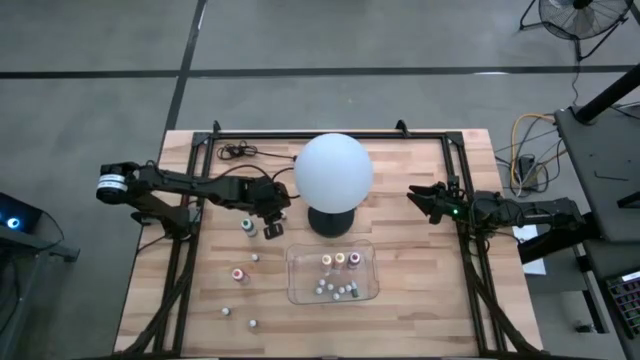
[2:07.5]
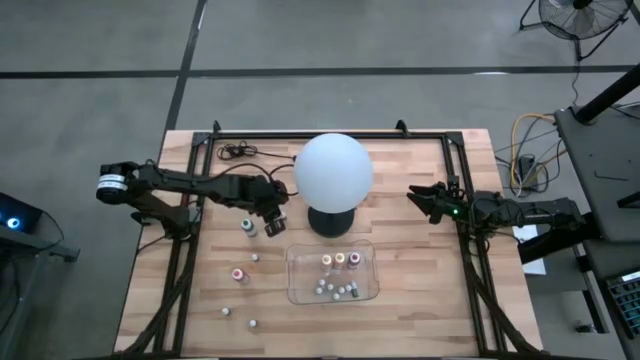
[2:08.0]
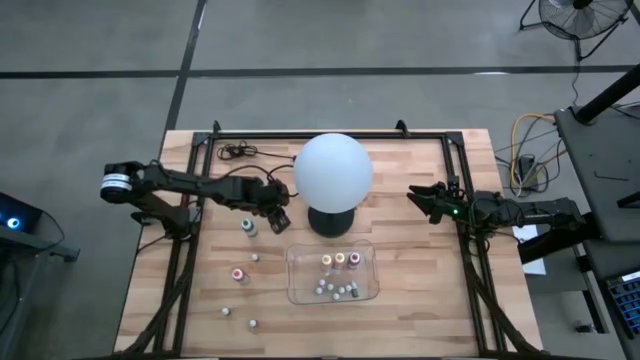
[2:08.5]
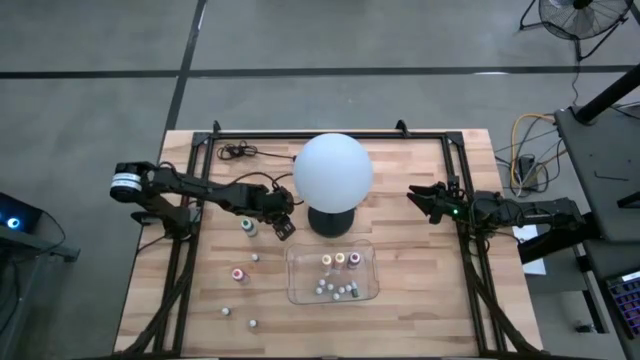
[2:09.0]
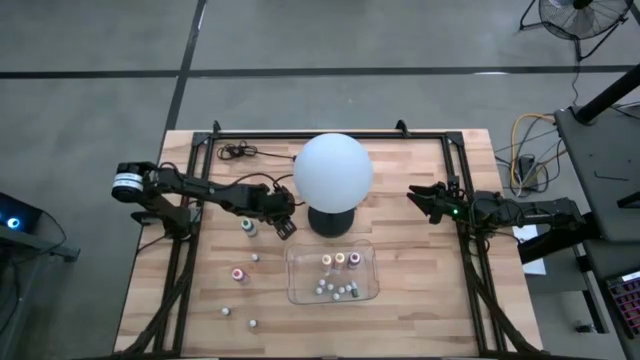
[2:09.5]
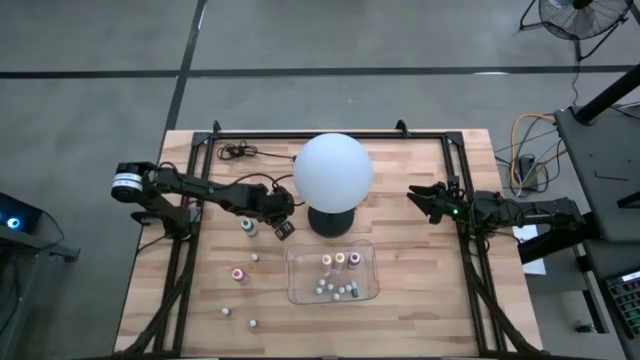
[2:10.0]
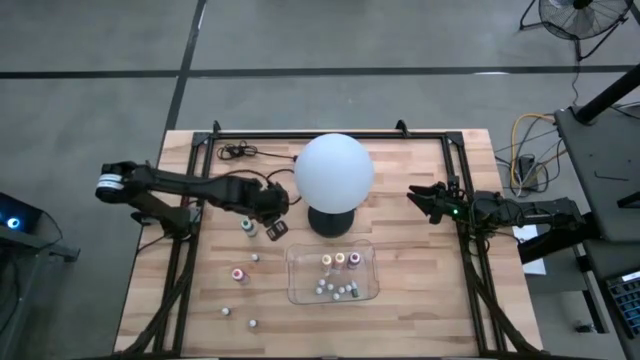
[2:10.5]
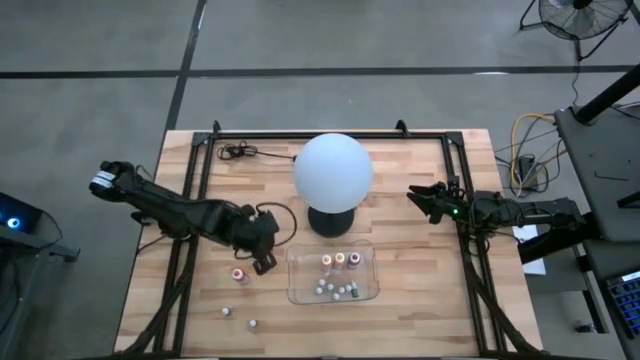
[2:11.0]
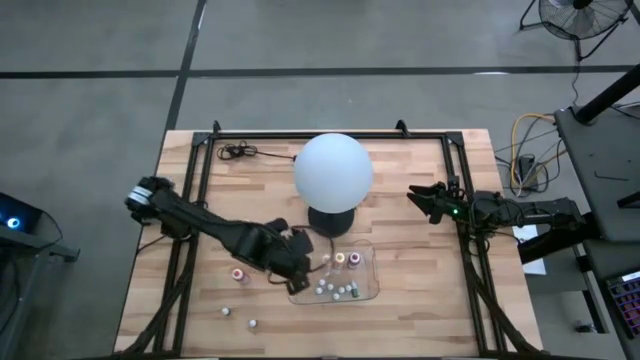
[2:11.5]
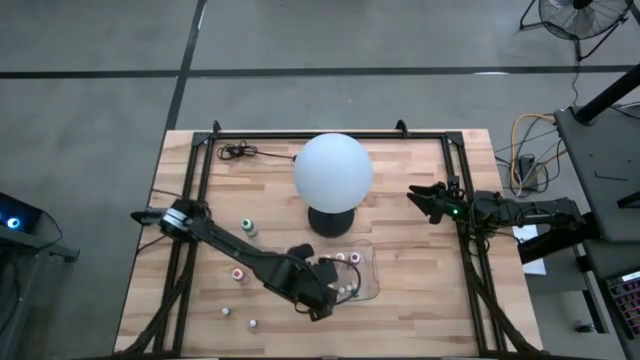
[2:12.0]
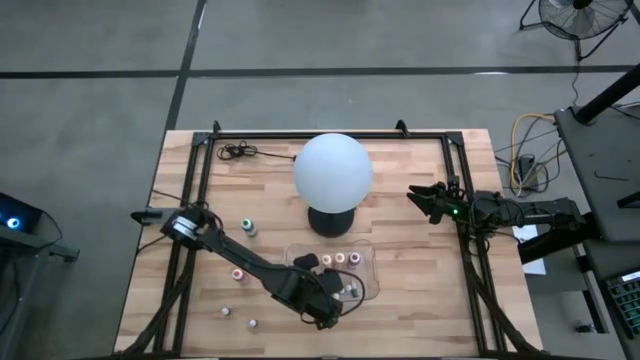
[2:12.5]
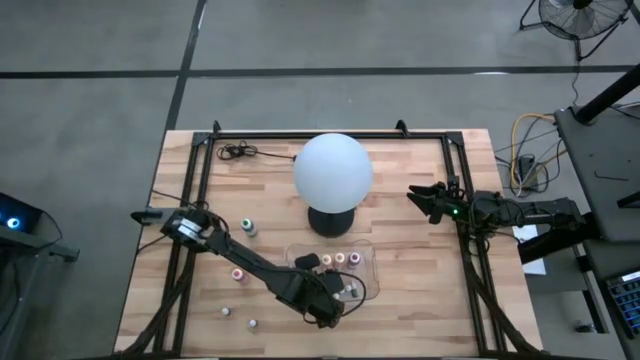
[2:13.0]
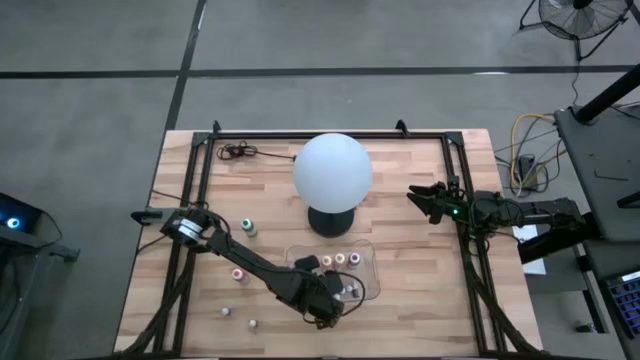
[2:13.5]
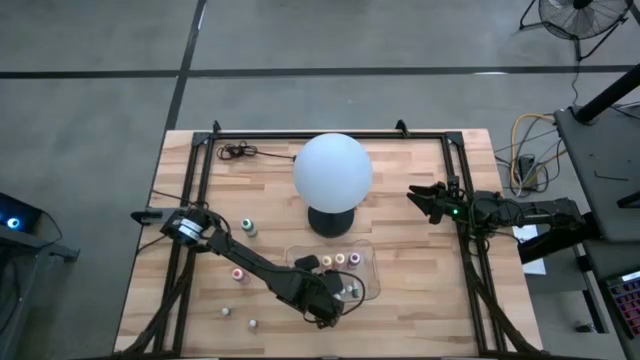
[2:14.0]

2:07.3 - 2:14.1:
Task: Pick & Place food coloring
Put the small pink food coloring bottle into the transparent bin

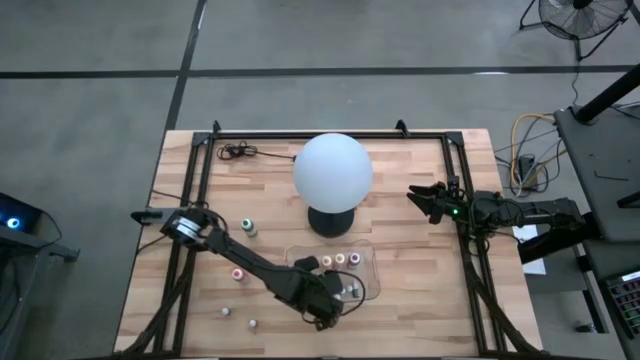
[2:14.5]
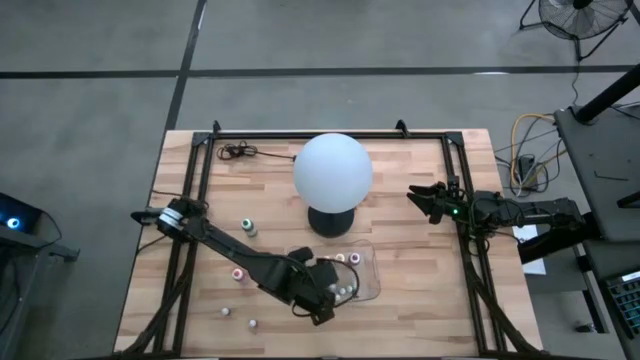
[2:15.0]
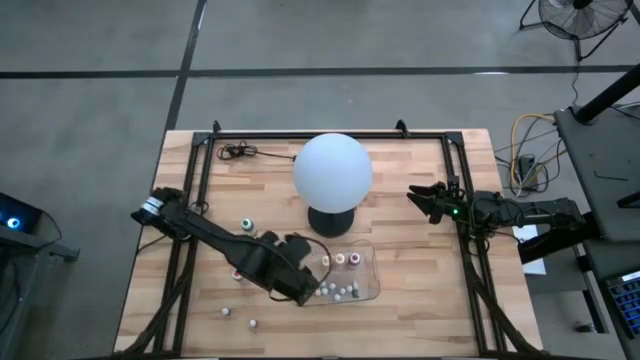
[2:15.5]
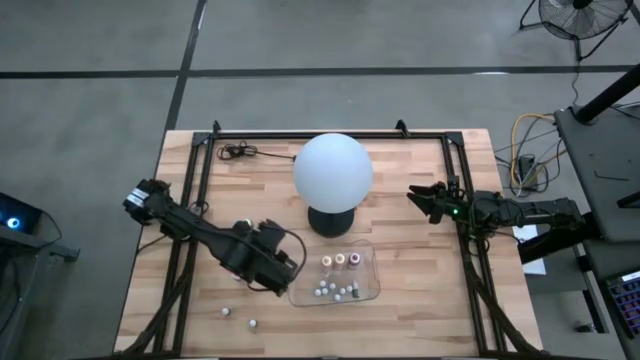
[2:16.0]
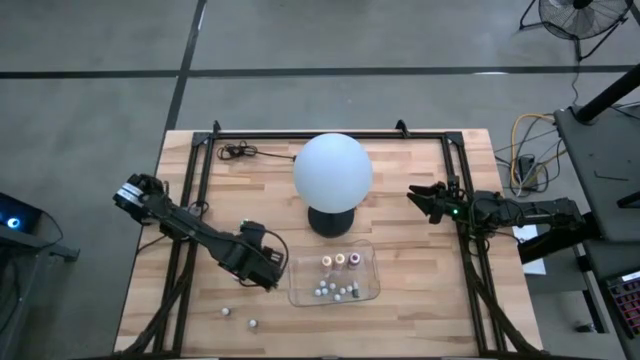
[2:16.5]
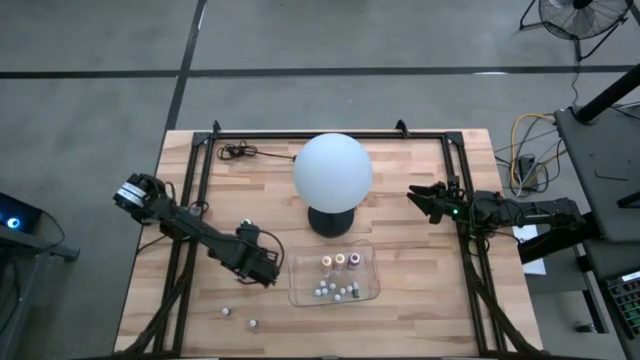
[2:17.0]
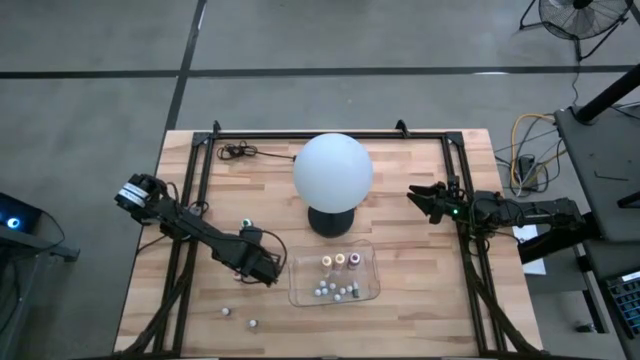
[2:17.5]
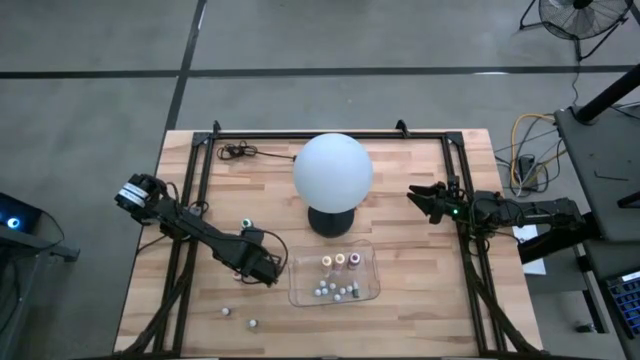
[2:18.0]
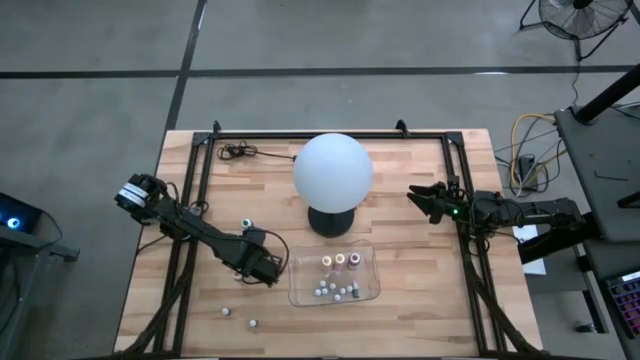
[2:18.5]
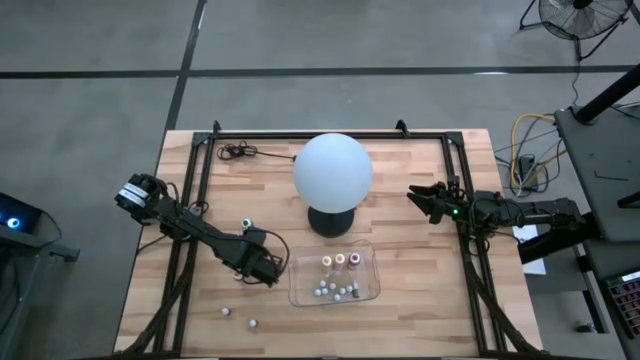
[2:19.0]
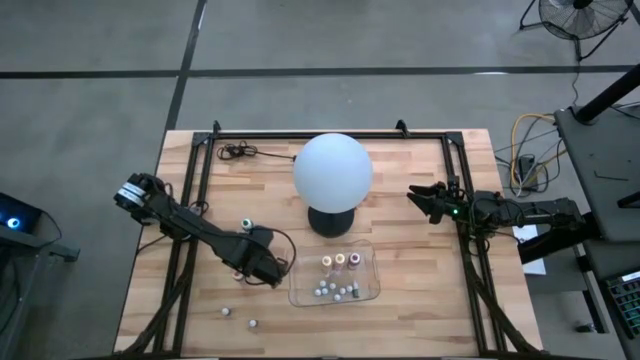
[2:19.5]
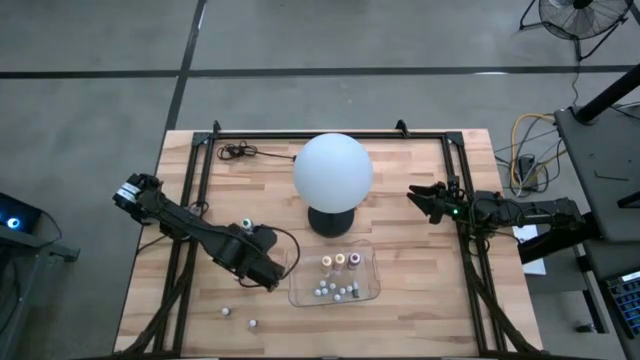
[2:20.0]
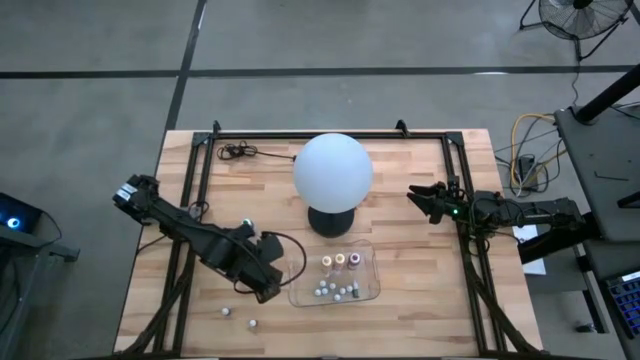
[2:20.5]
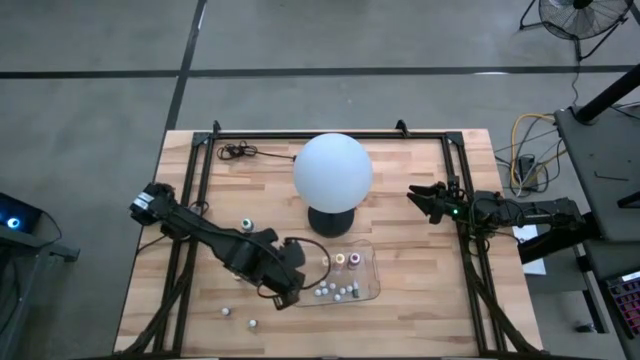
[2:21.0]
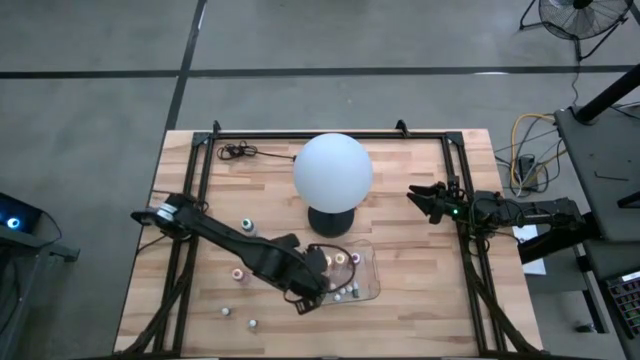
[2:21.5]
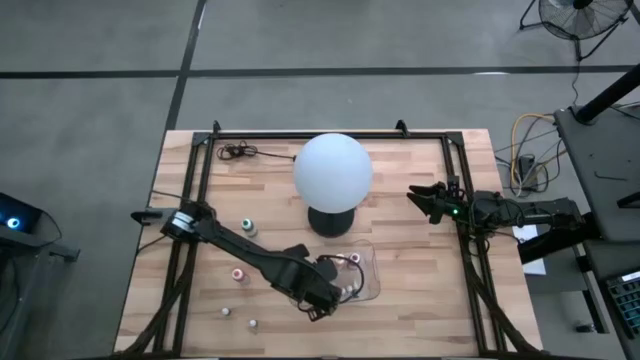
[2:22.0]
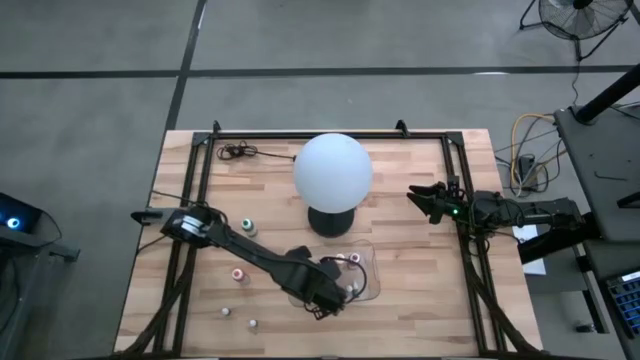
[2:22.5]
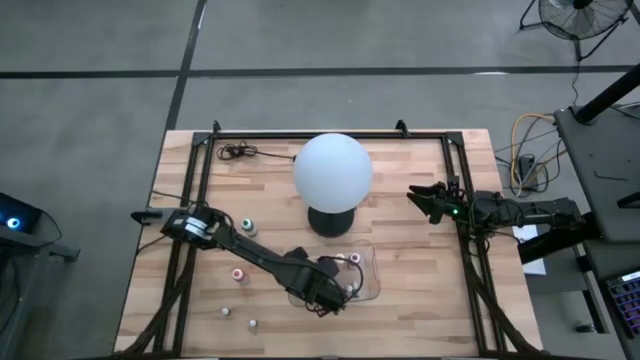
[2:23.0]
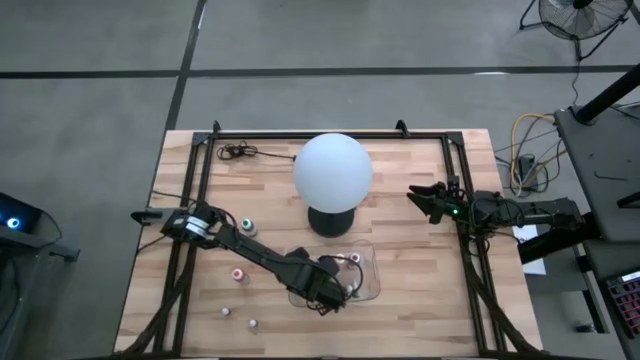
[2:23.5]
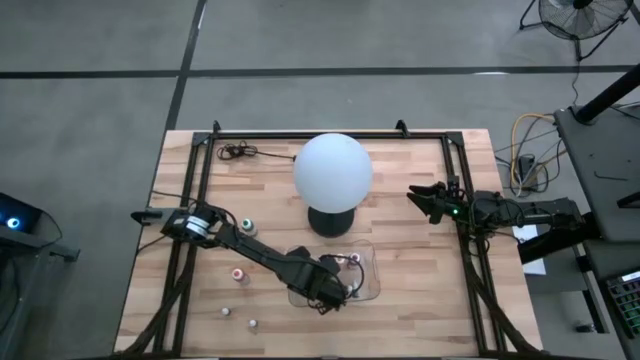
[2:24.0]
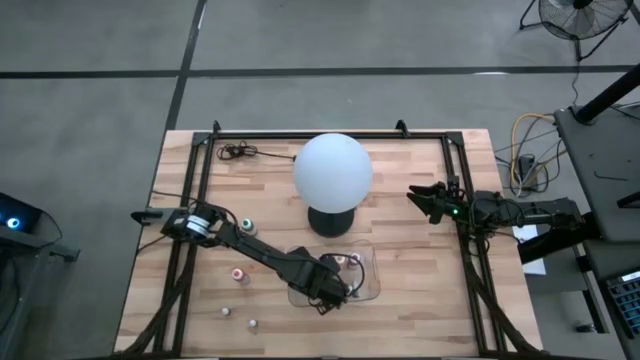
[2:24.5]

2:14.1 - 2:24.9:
Put the top right small blue food coloring bottle into the transparent bin

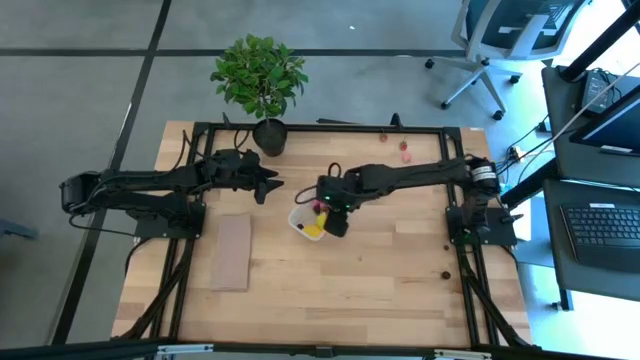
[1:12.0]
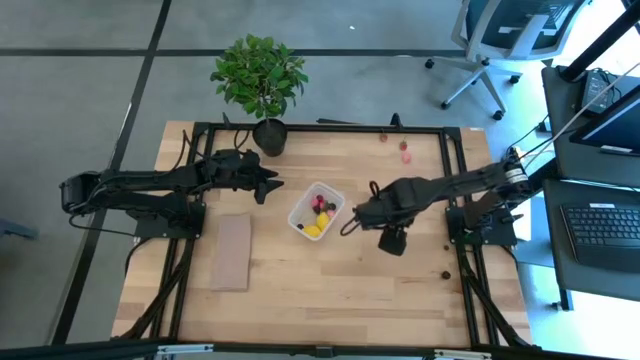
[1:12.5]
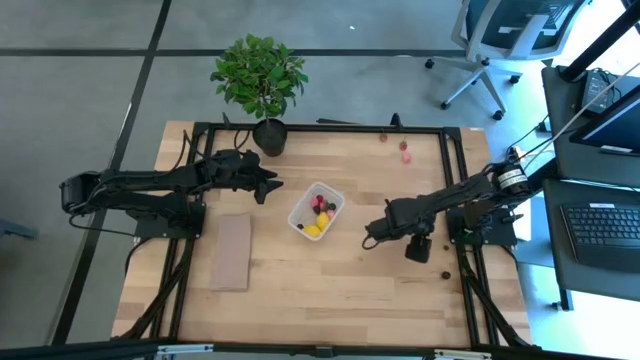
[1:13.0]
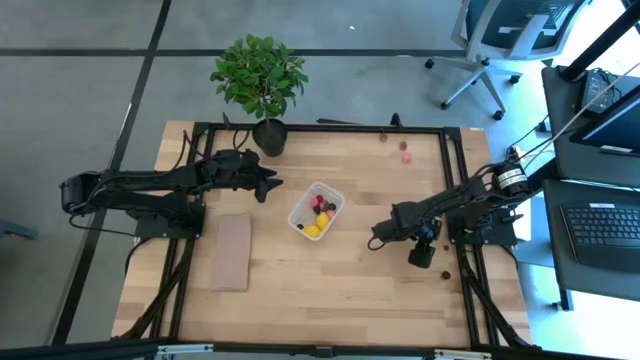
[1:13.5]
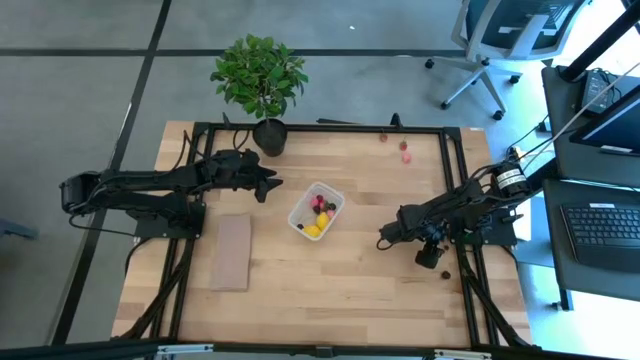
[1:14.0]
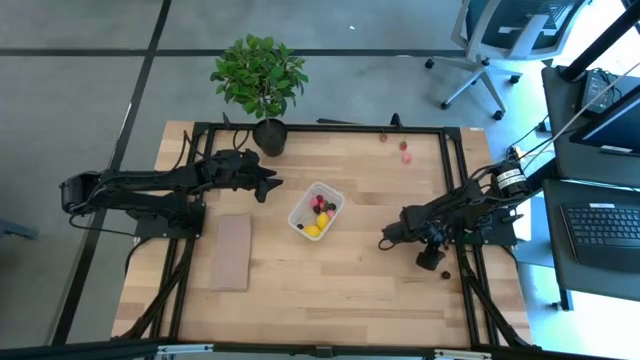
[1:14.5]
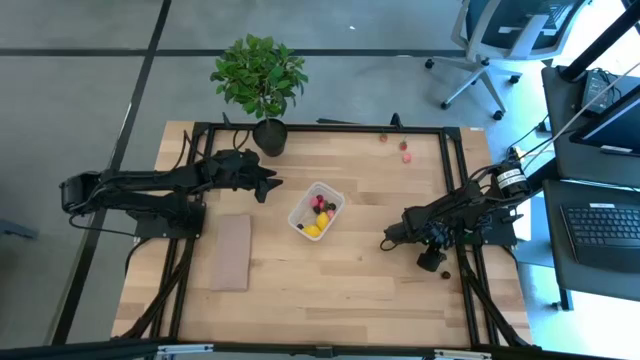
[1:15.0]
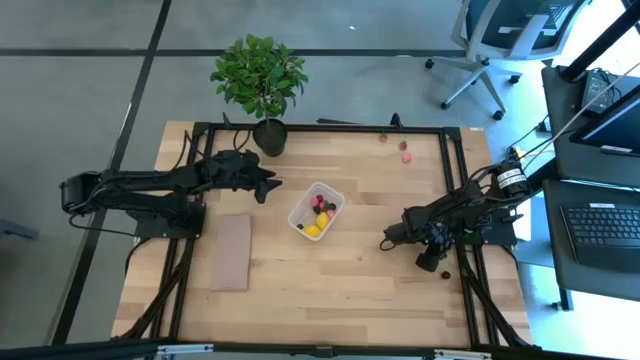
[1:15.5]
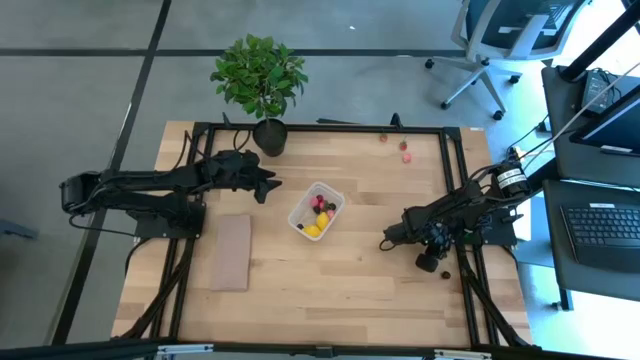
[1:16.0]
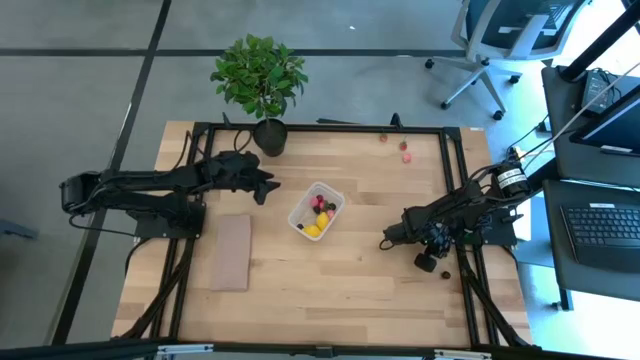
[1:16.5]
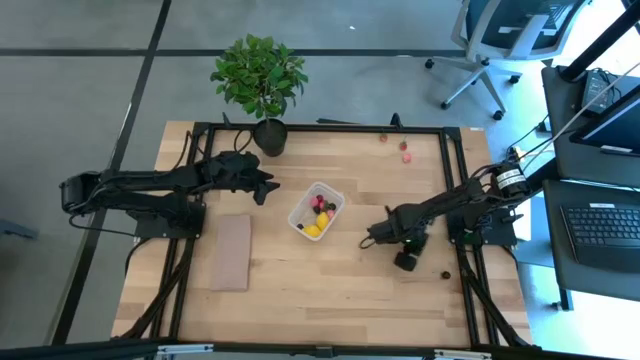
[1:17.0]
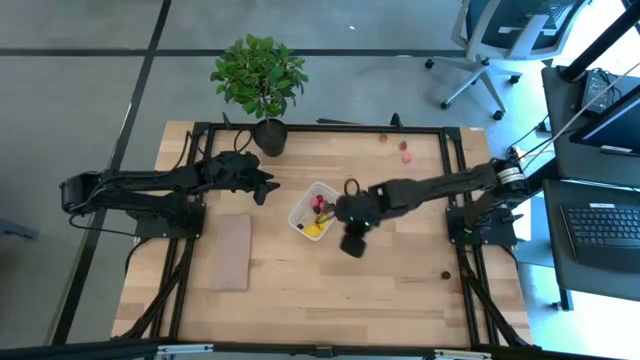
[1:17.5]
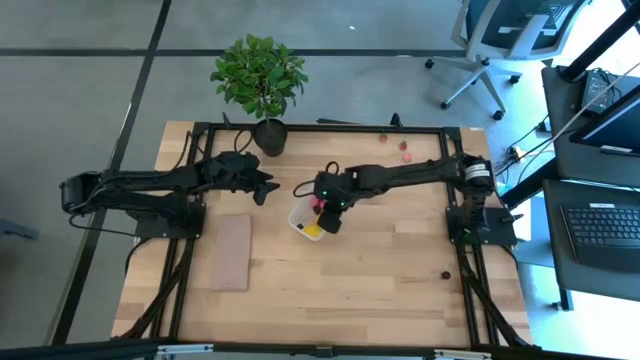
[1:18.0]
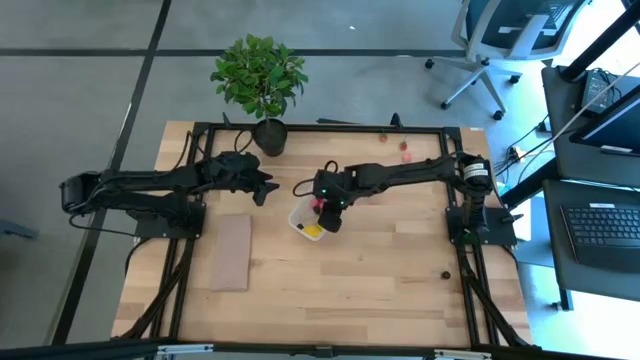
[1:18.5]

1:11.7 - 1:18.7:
Task: Pick and placing Produce into tupperware
Put the blueberry into the transparent bin
